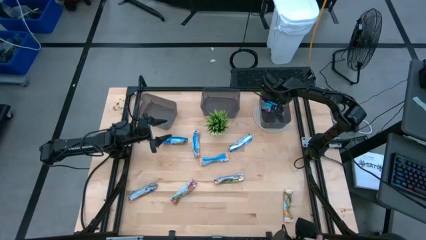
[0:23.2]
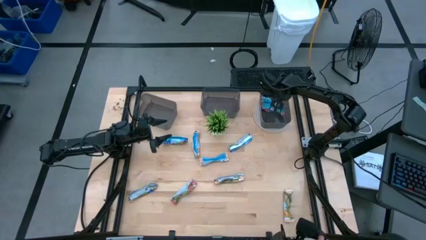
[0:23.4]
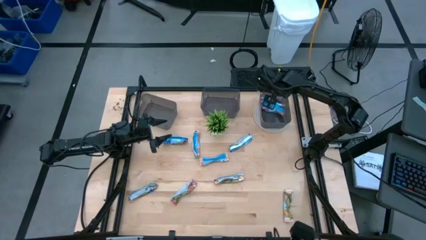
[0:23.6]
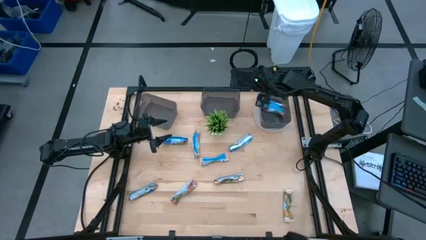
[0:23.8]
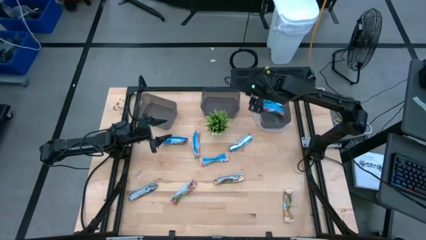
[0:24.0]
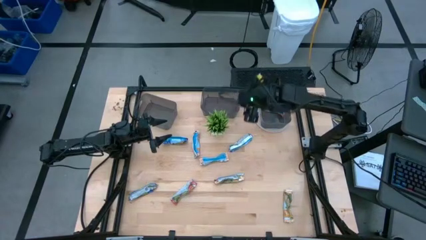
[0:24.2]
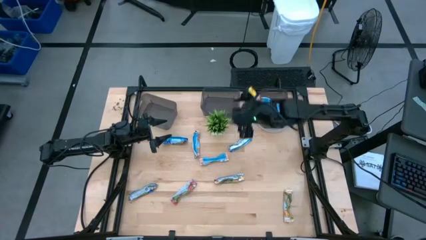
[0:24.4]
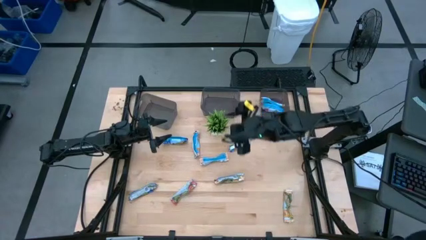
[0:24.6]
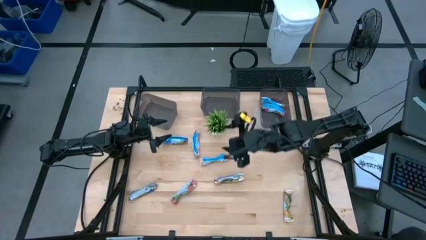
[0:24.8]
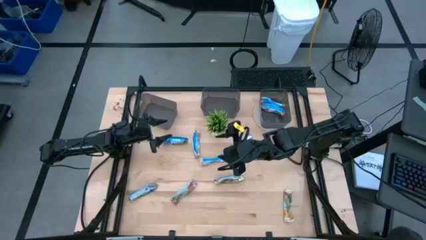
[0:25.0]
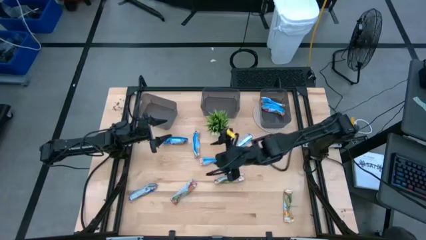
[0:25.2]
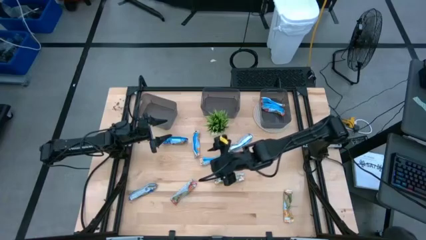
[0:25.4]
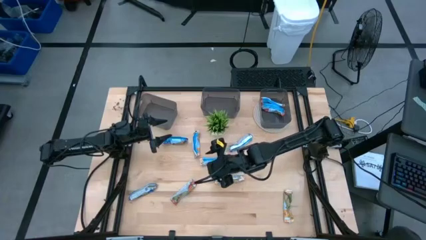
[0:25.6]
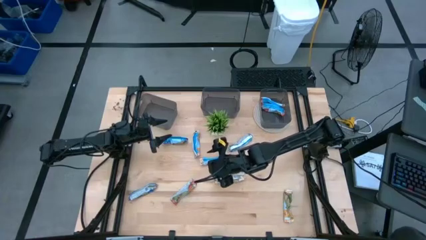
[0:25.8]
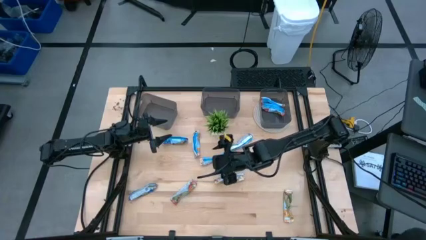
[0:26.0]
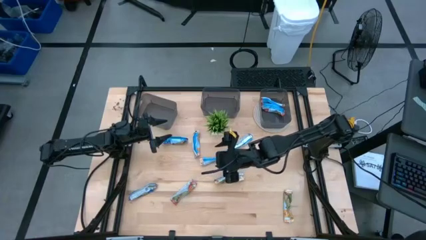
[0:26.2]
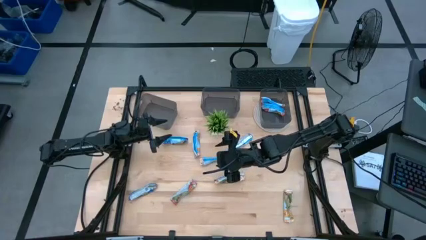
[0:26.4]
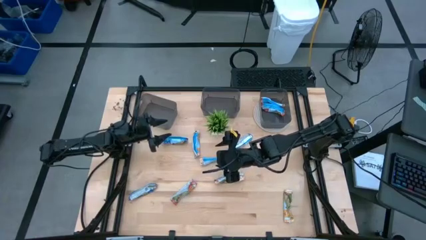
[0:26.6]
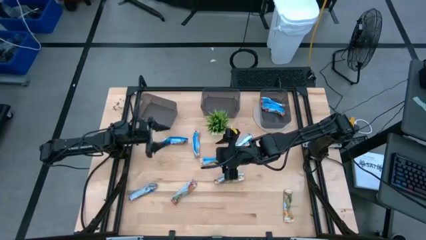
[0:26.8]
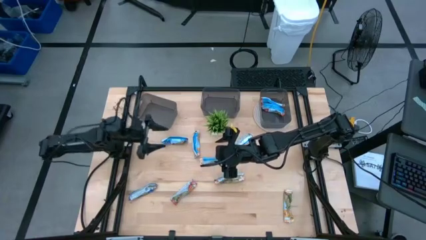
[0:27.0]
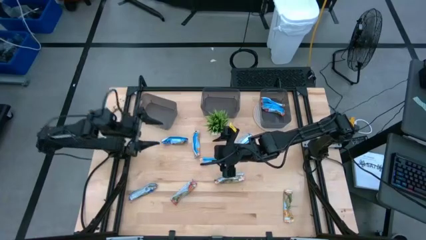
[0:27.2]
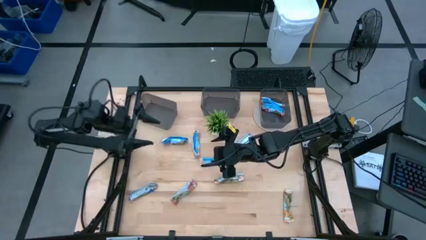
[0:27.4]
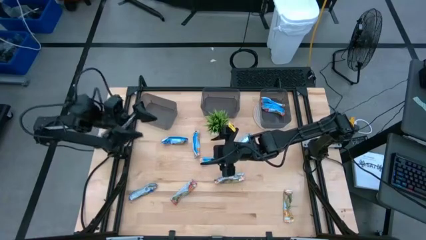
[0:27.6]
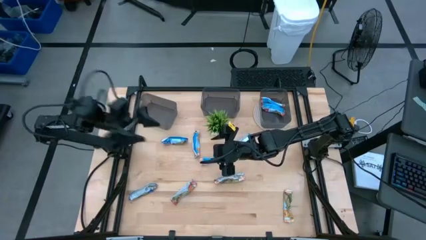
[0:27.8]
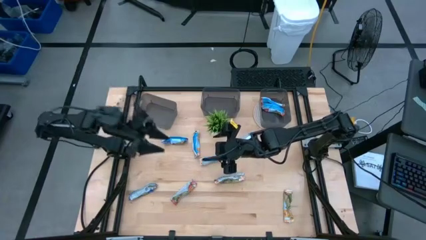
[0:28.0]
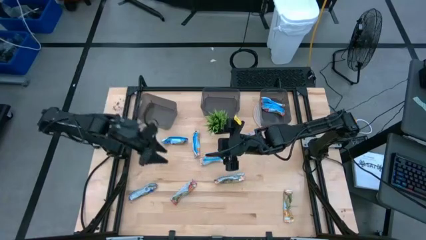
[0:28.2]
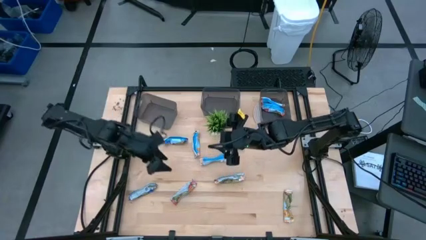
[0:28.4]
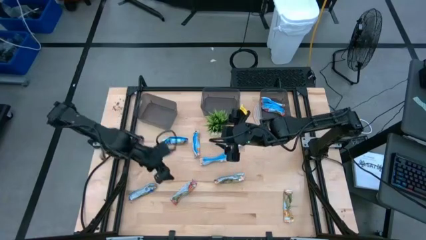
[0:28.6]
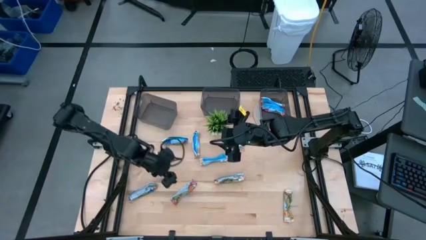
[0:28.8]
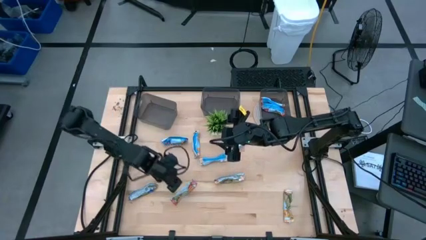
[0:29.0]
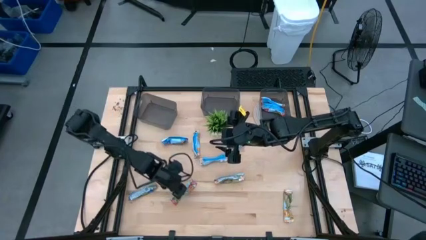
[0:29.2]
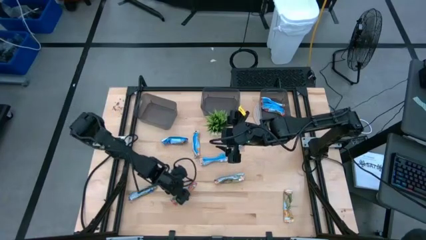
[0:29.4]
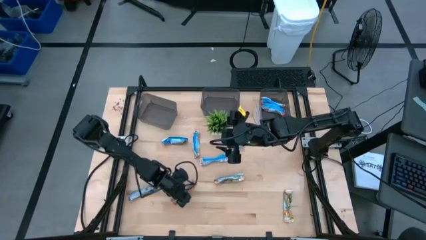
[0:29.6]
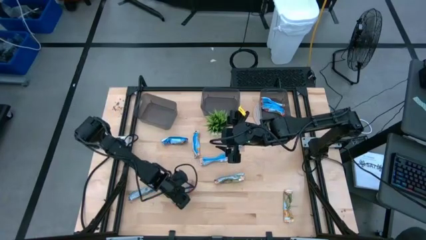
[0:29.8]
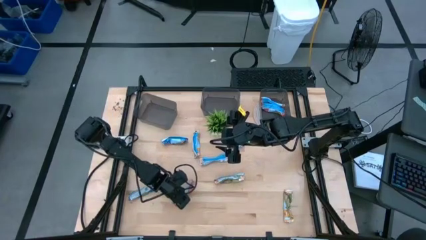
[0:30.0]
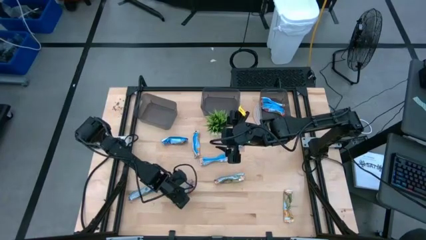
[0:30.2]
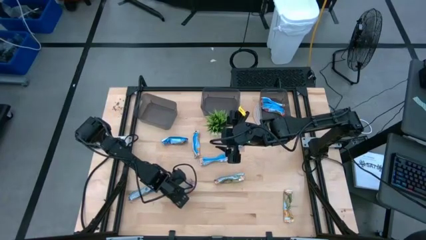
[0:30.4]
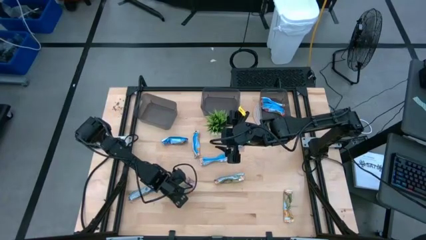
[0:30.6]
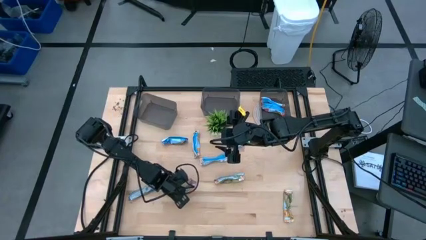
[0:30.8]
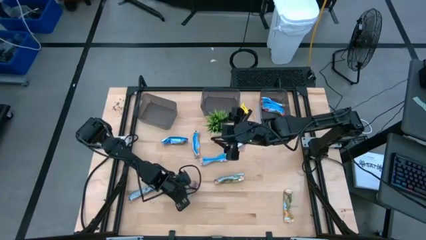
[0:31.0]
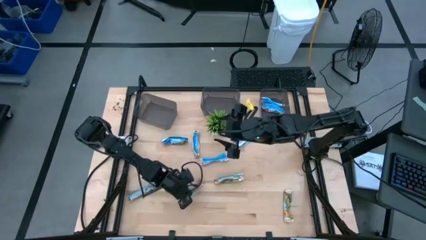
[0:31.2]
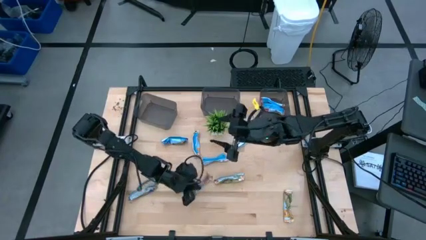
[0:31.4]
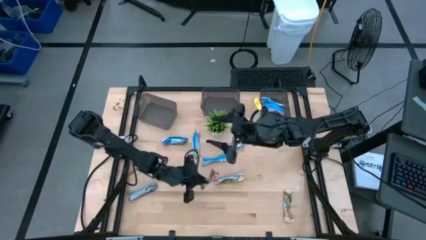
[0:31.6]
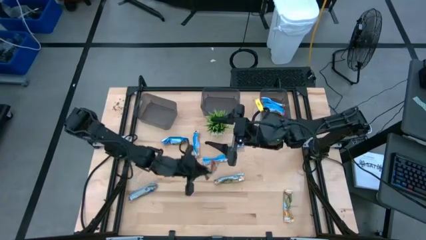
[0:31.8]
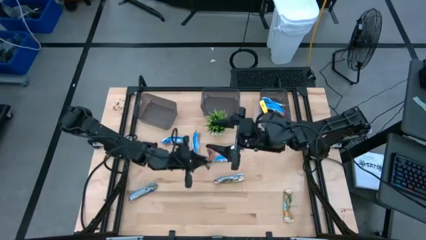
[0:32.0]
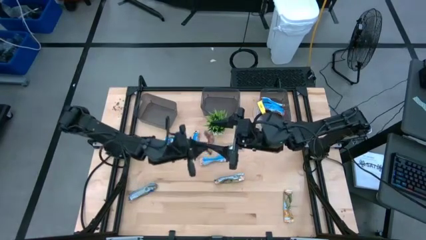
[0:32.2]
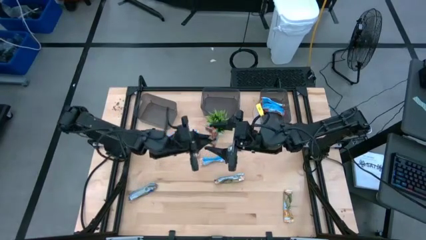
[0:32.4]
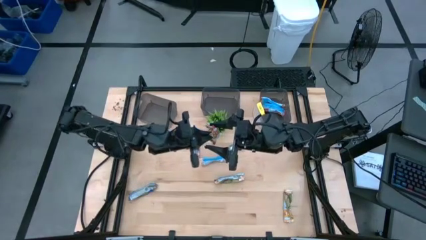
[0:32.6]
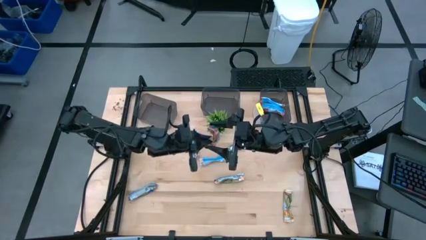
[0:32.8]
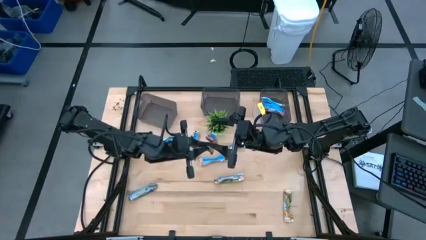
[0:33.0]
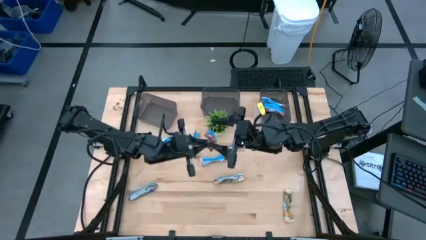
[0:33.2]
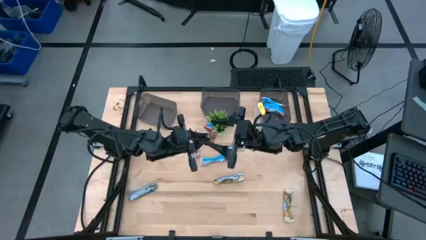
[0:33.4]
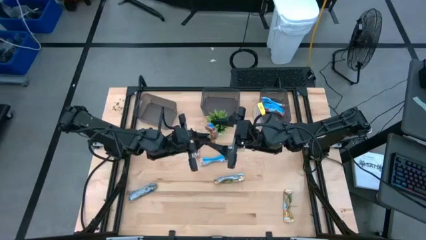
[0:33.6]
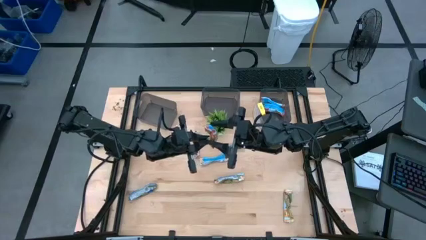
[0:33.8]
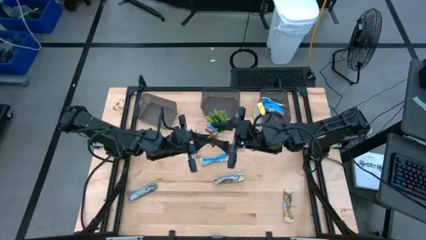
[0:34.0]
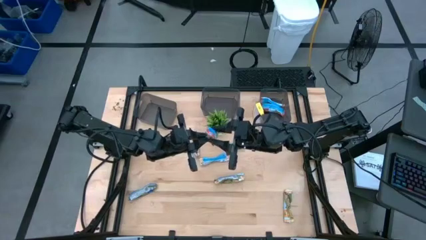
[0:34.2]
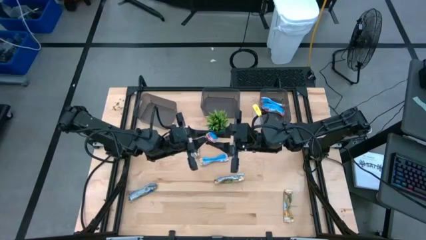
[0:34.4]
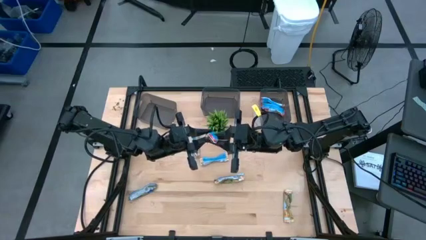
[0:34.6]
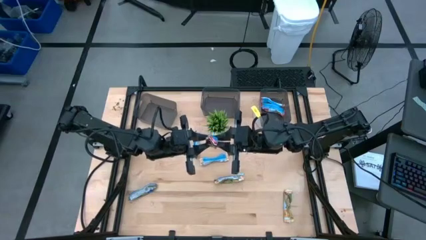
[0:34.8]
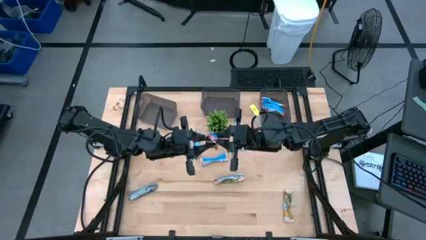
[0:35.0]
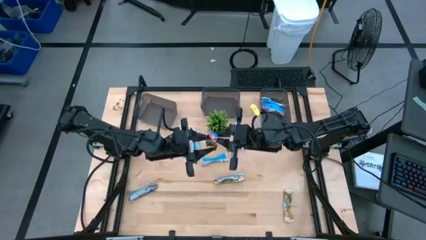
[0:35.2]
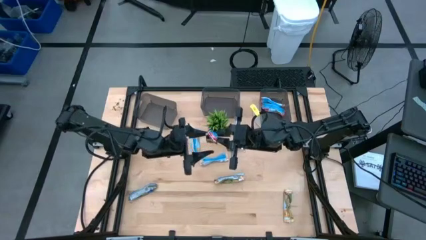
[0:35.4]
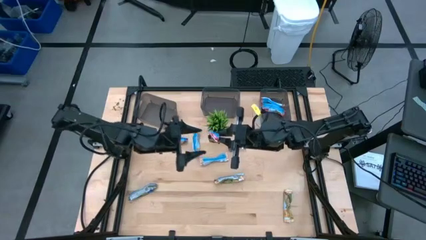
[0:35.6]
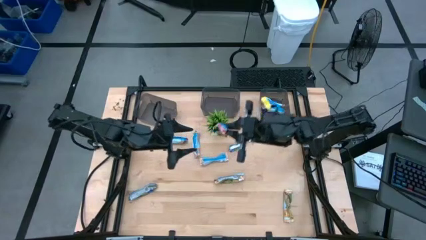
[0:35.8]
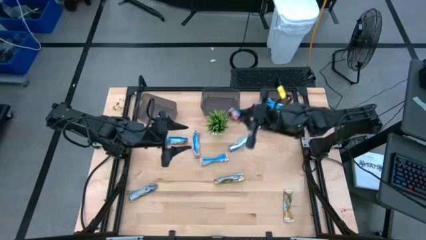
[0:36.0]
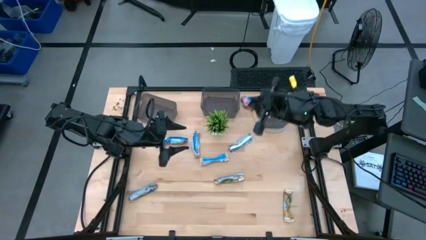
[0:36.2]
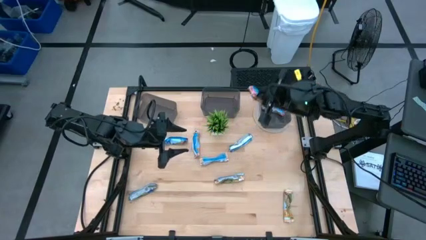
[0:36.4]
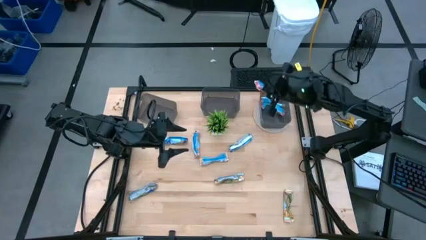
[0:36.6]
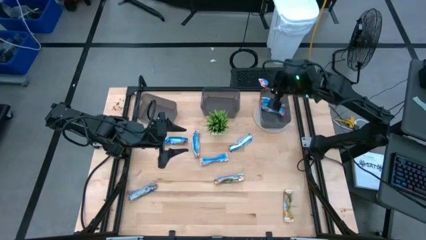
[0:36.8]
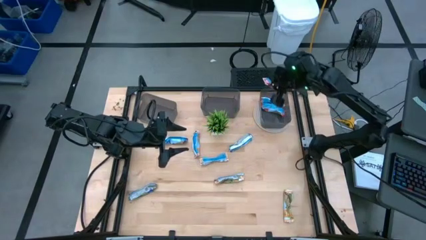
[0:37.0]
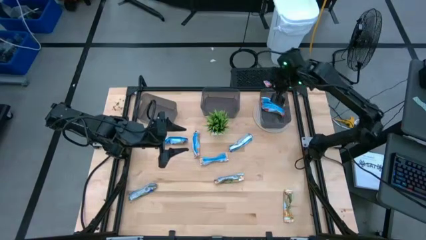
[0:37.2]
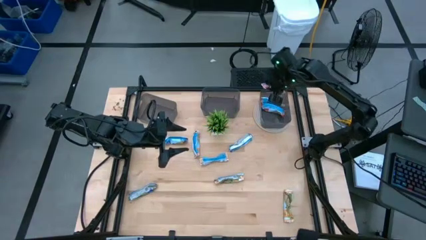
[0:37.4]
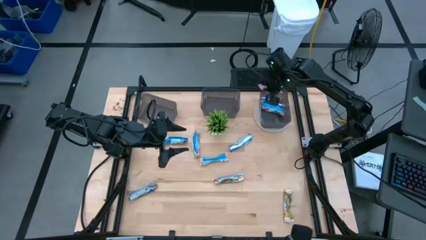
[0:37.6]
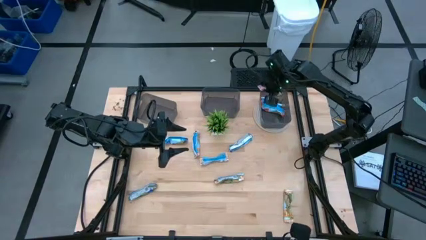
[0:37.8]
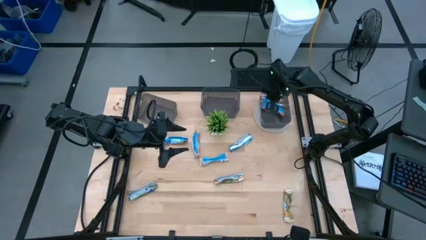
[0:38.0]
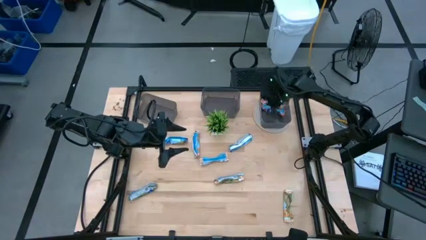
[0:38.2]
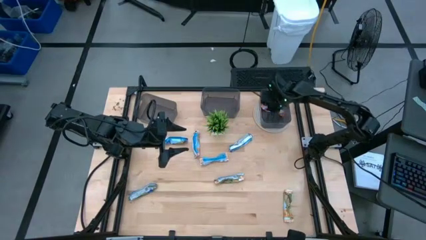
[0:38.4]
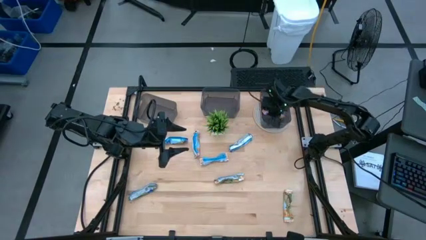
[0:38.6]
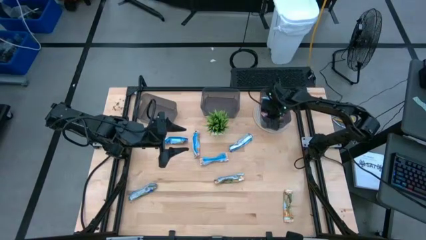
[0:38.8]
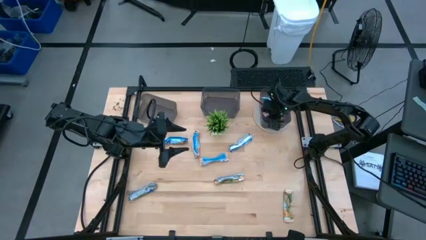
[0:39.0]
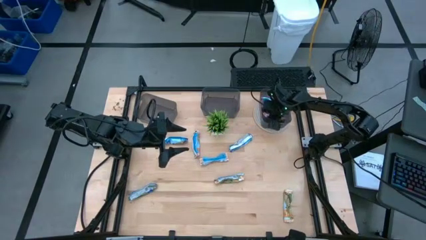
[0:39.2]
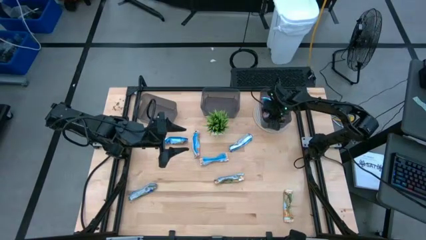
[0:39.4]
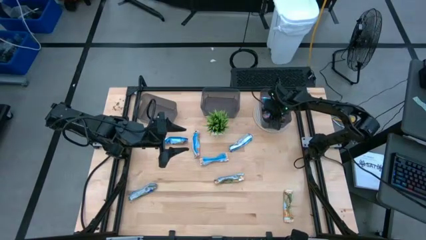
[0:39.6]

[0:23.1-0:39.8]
Task: Pick and place Granola Bars by type
Put the red granola bar into the right black bin
